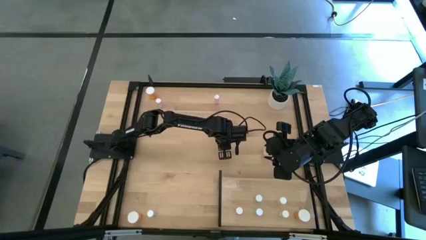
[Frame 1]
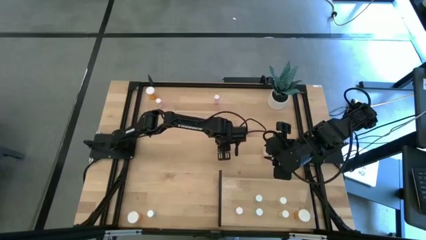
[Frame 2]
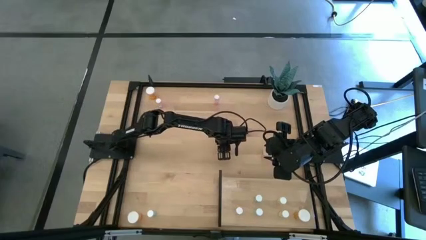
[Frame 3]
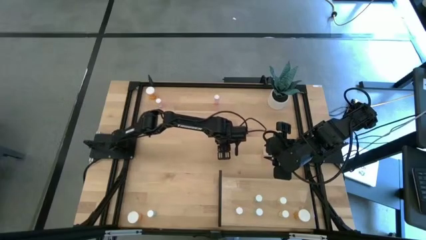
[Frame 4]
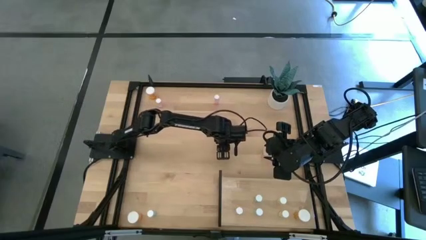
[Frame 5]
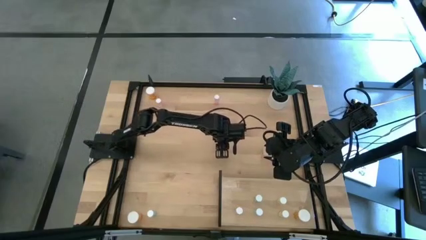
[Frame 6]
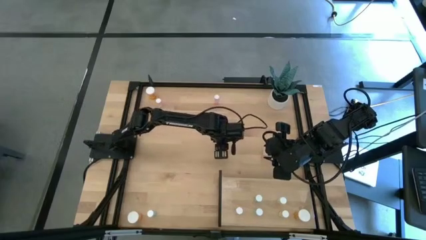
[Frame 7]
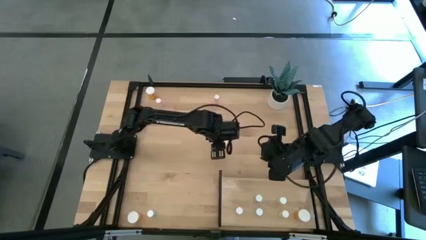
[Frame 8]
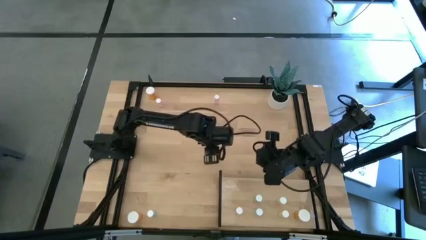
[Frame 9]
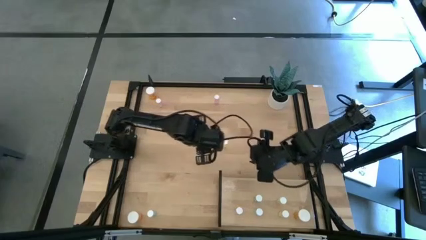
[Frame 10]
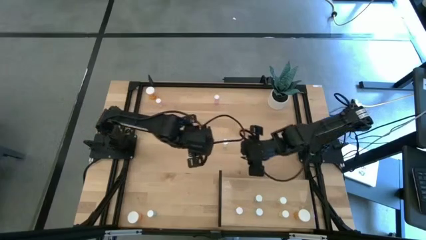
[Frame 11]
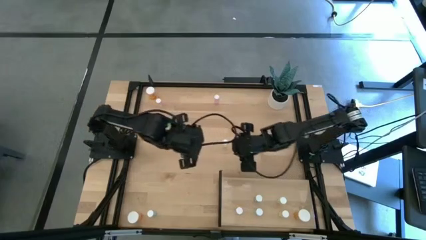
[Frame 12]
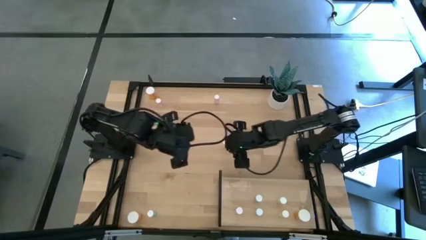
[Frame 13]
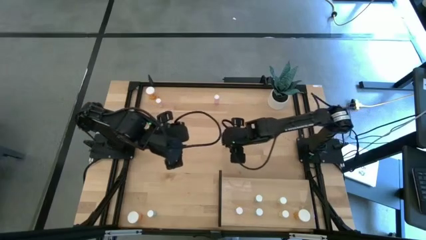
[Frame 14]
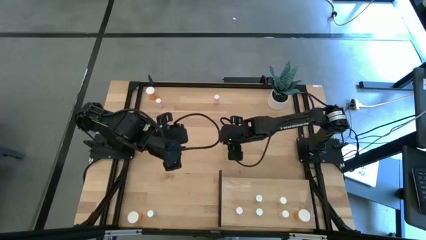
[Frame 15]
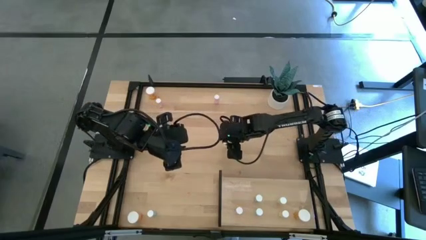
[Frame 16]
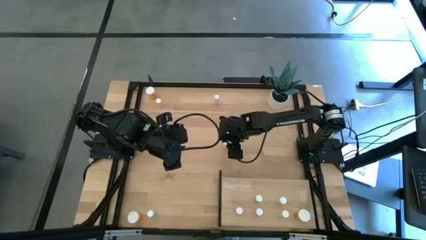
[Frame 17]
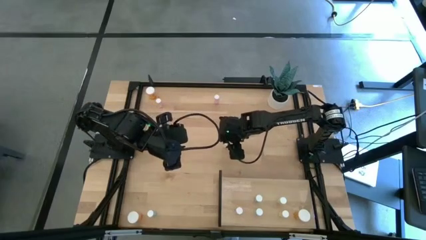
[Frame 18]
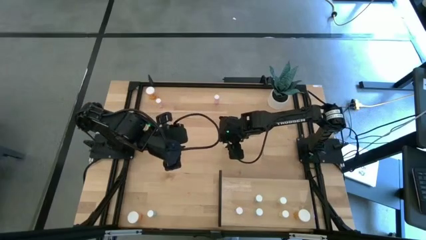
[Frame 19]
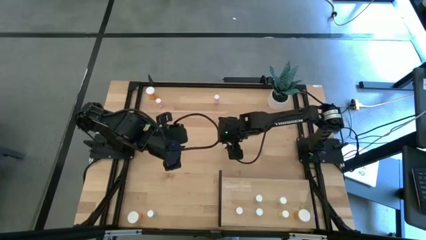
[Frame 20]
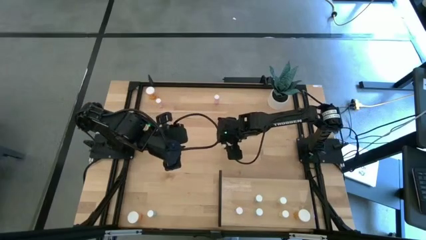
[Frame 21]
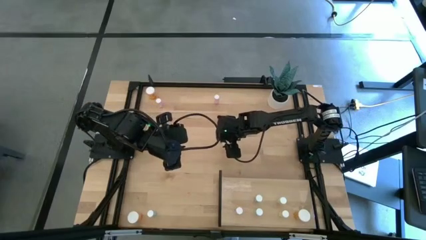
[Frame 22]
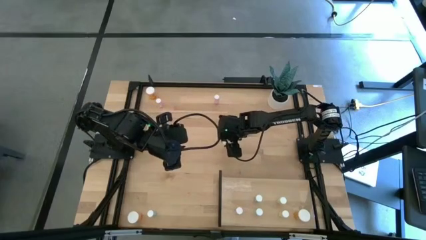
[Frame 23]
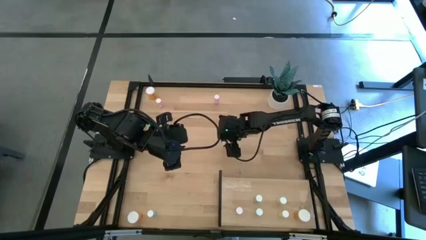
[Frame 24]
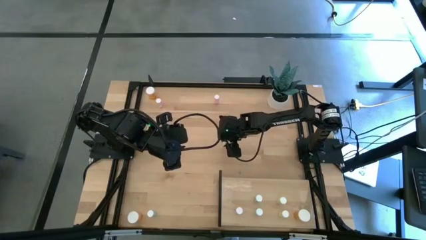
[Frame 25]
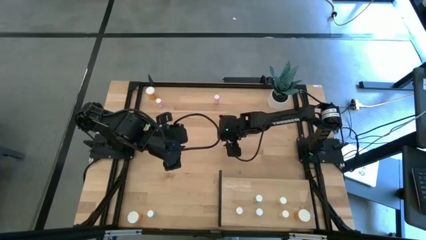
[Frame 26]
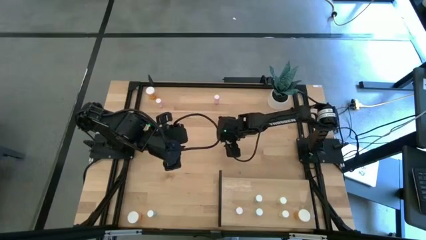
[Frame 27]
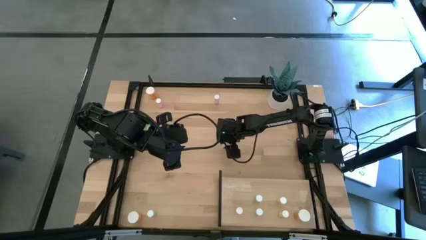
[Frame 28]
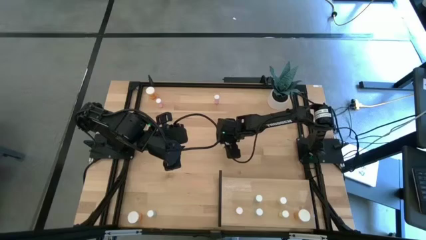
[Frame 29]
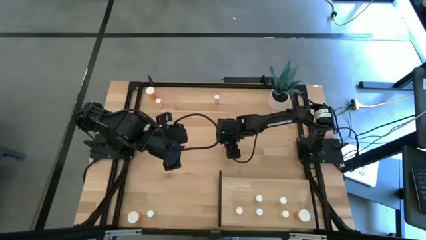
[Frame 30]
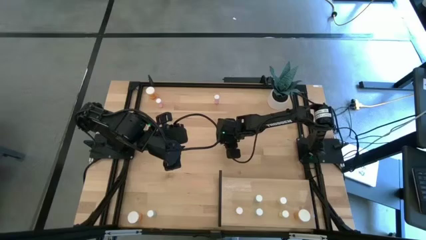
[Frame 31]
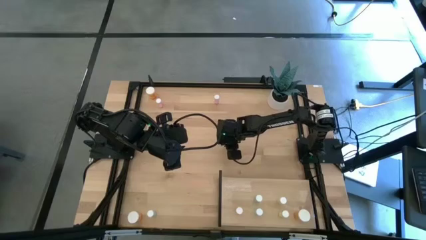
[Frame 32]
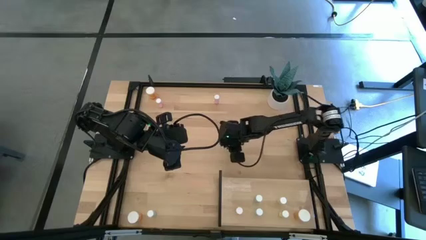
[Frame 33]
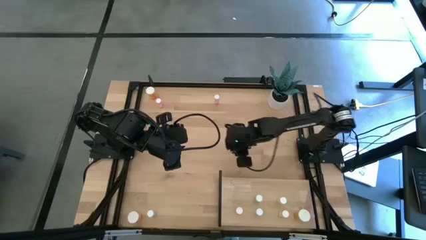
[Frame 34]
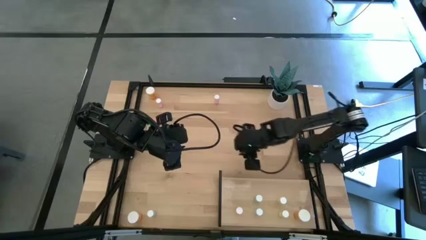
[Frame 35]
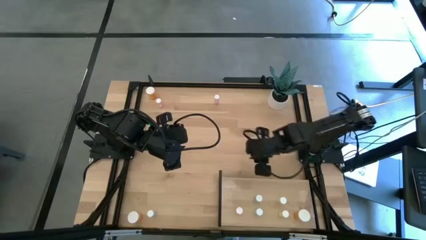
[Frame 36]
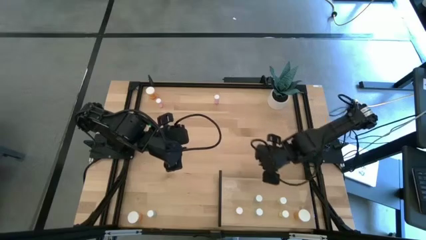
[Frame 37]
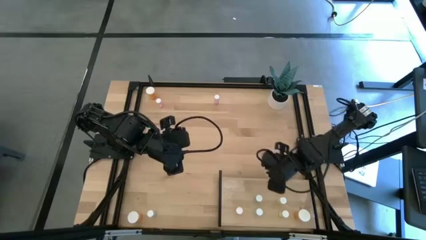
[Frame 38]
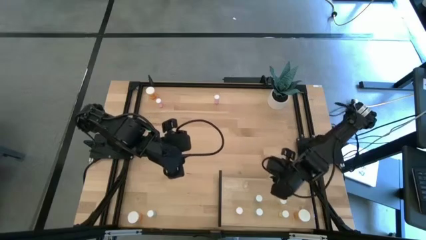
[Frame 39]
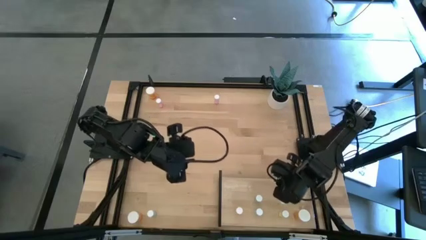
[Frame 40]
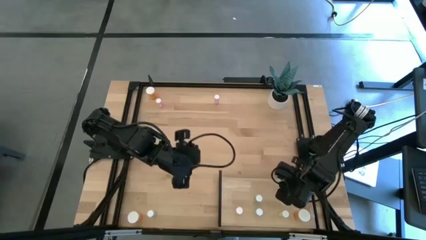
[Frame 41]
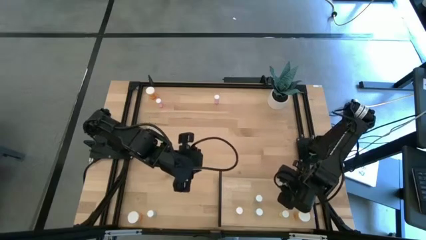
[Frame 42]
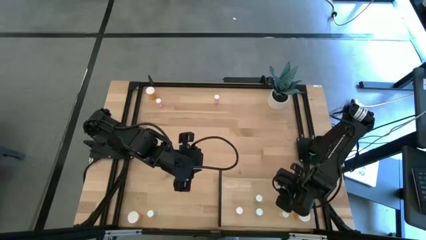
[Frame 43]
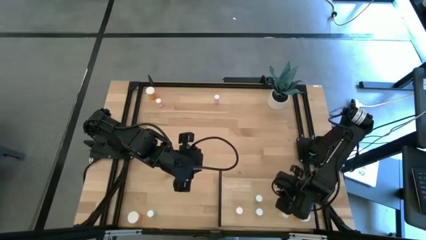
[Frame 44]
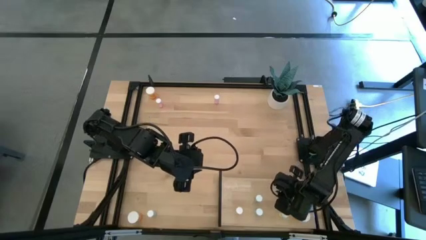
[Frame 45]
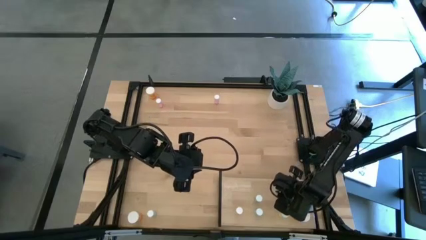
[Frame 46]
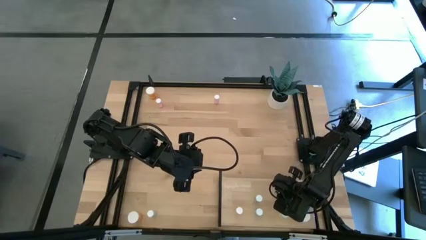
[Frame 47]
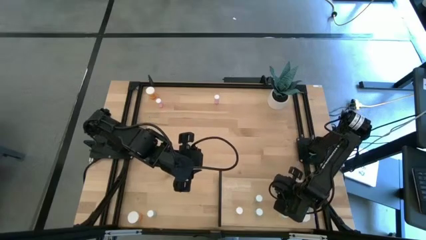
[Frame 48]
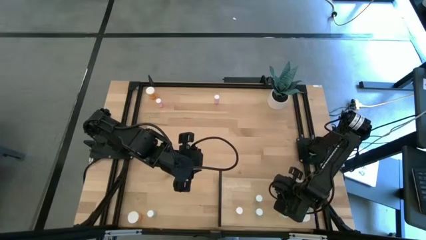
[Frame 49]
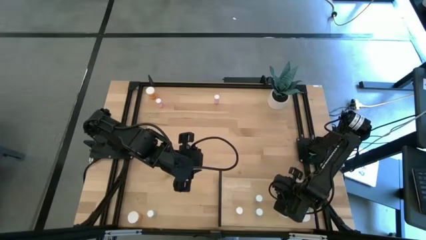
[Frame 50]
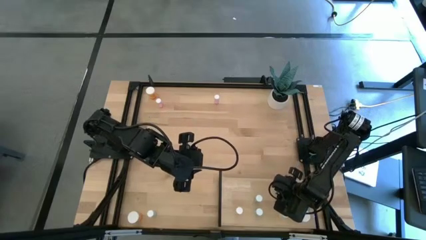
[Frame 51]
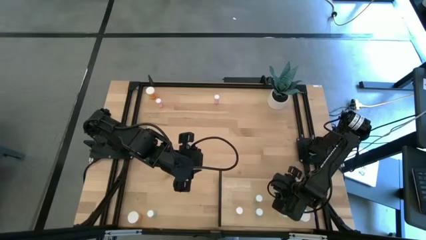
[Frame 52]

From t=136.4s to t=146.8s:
Task: Pick and place medicine bottles onto shelf by color
Put the yellow pill bottle on the shelf aligned with the other yellow pill bottle

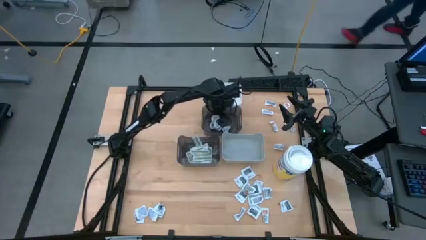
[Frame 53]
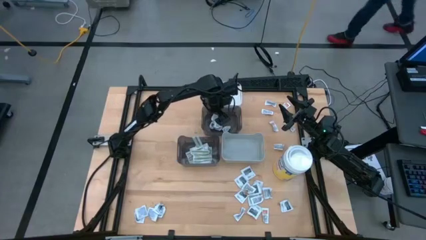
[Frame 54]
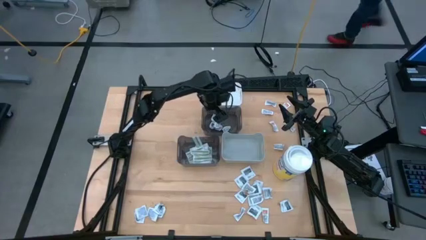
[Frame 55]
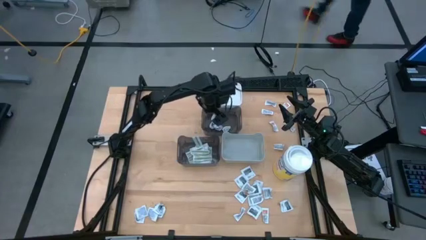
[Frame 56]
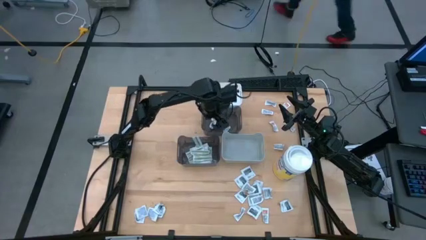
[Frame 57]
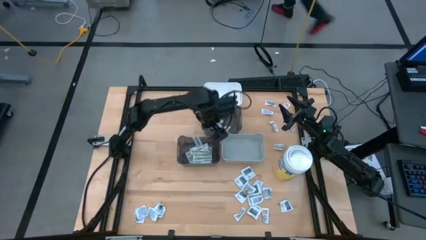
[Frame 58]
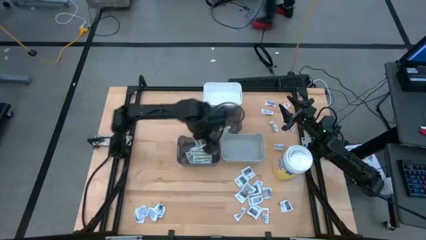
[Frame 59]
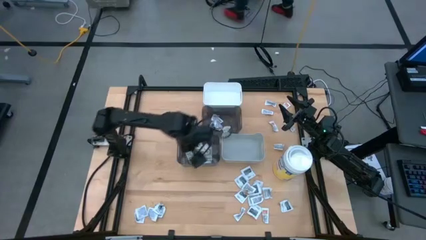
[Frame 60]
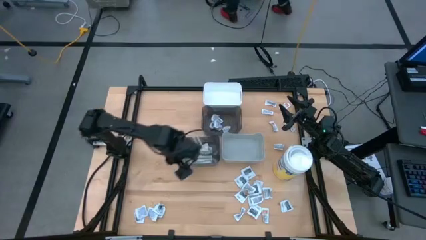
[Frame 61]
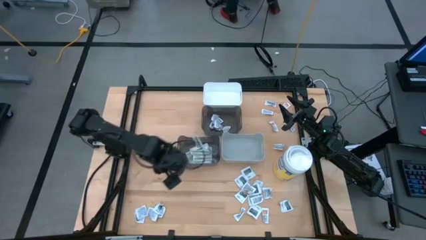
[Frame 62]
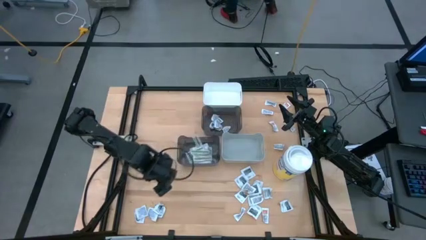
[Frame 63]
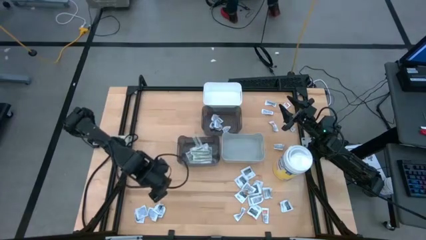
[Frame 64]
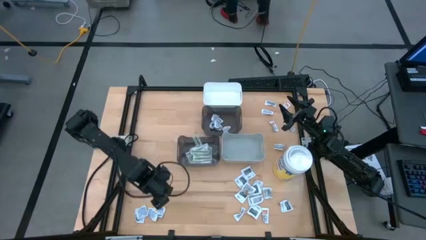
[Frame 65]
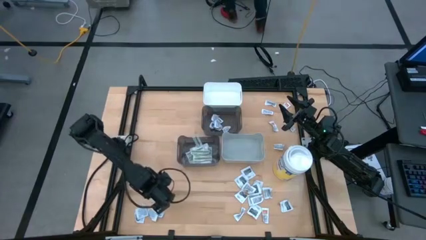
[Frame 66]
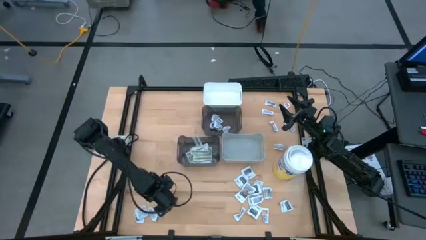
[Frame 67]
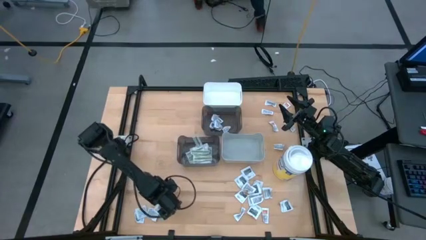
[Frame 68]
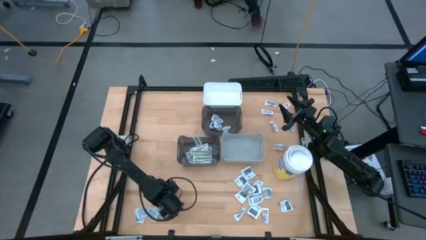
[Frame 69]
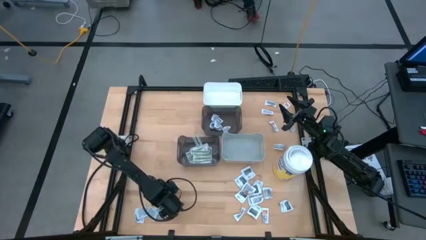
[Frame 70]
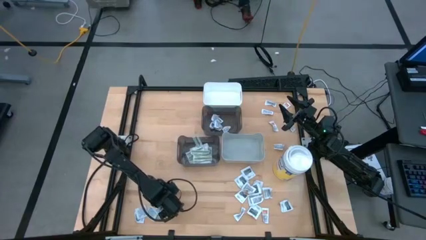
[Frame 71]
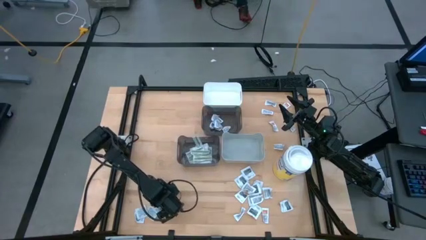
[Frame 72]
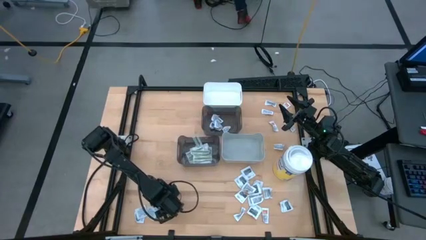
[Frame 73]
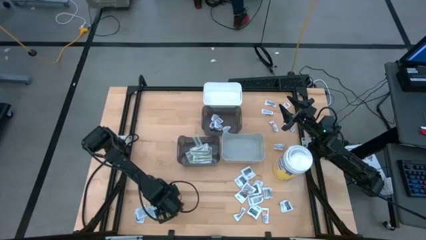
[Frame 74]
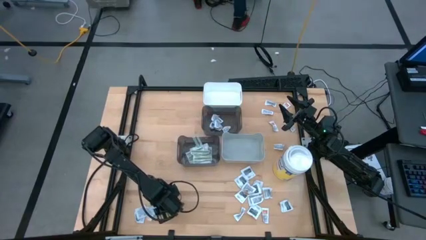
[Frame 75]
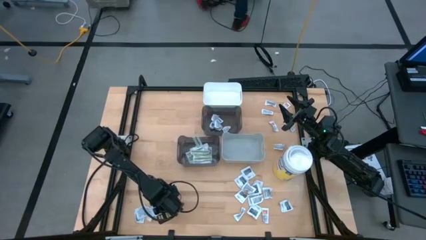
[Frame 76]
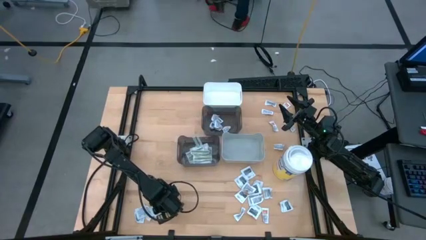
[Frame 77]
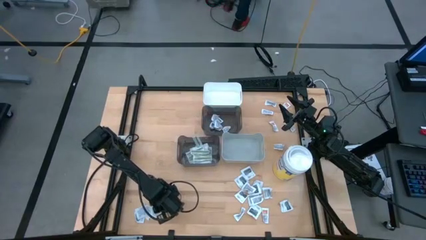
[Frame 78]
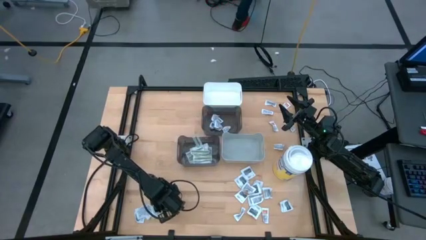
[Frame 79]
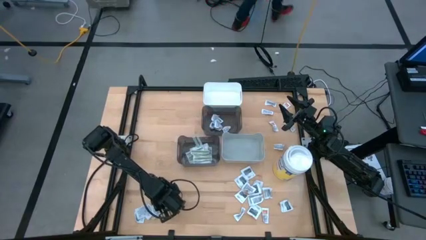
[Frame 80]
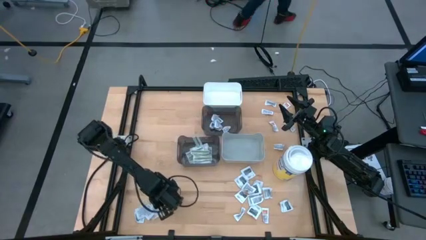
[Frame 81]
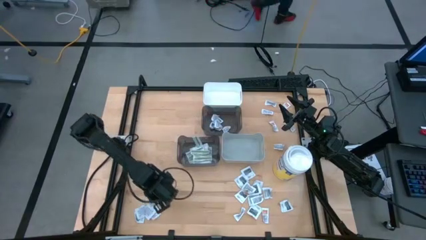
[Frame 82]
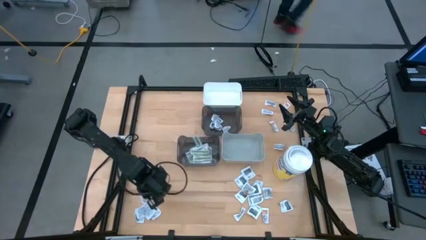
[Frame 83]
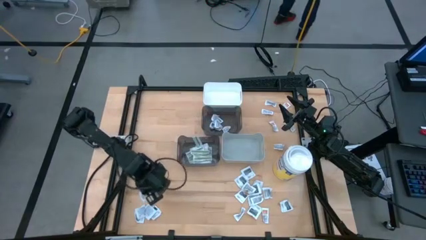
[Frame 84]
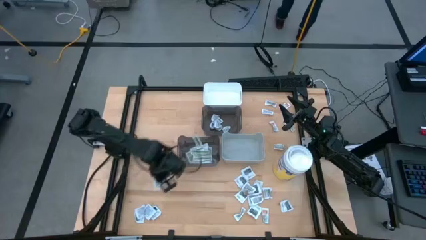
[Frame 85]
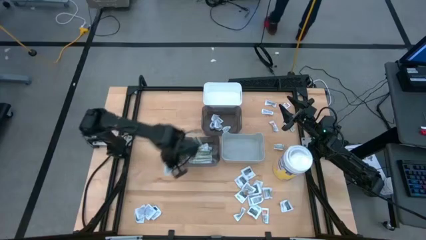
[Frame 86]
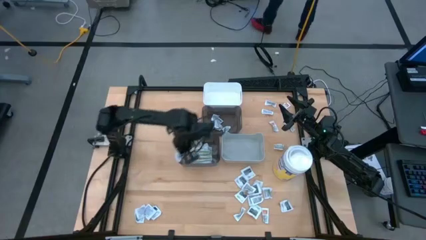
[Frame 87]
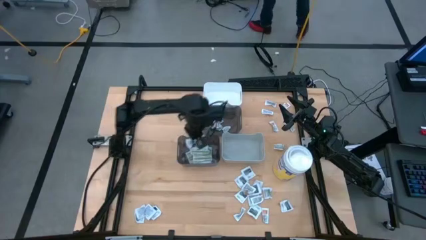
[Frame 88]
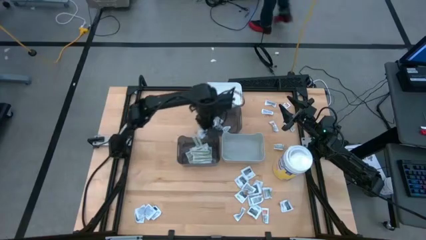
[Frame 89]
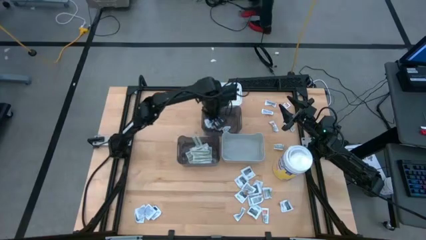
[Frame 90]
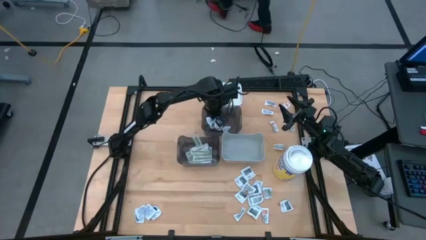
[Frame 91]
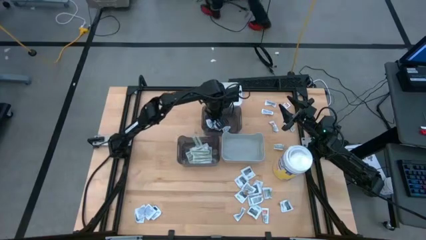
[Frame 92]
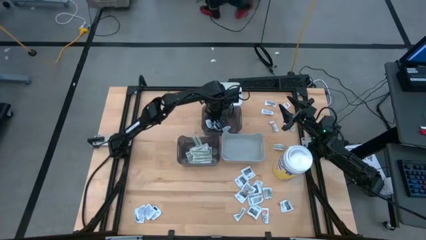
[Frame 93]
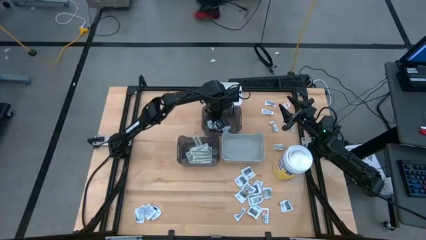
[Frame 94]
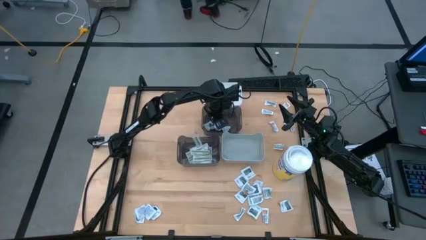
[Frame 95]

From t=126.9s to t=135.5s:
Task: Pick & Place First Aid Supplies
Put the white alcohol pad into the top black bin
